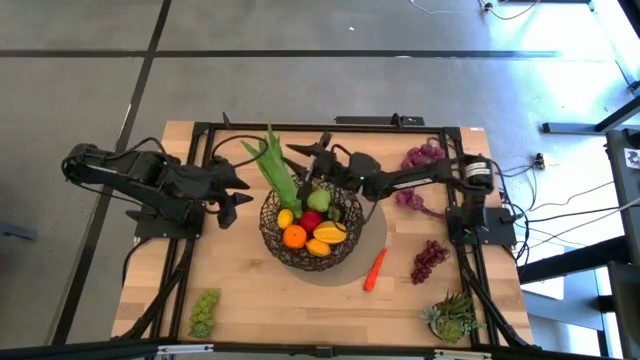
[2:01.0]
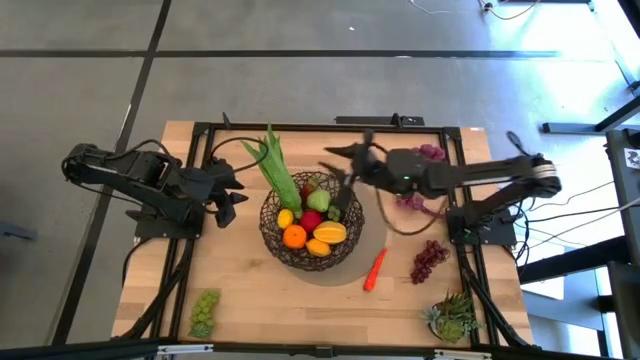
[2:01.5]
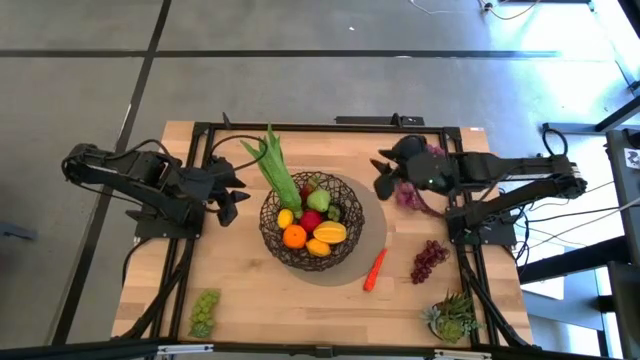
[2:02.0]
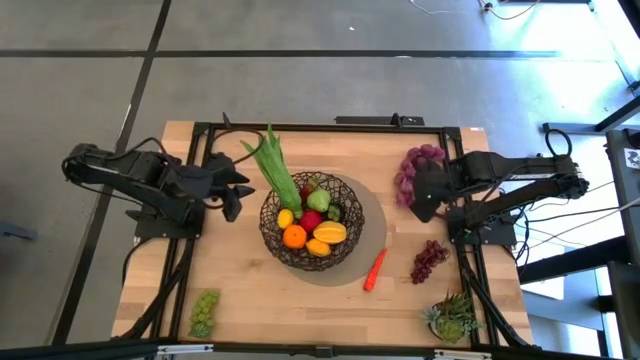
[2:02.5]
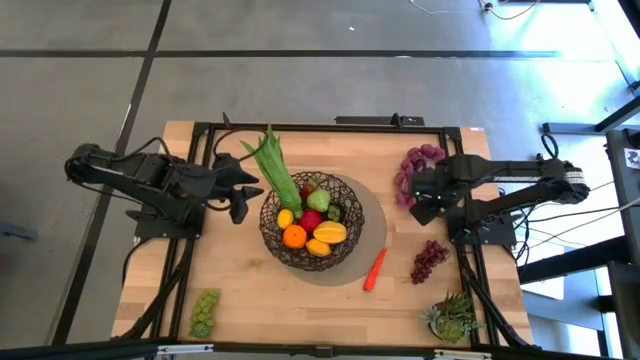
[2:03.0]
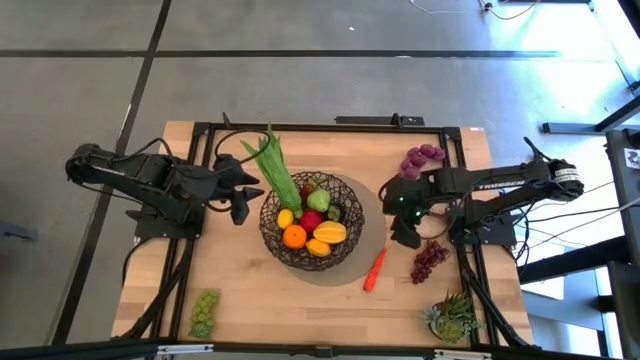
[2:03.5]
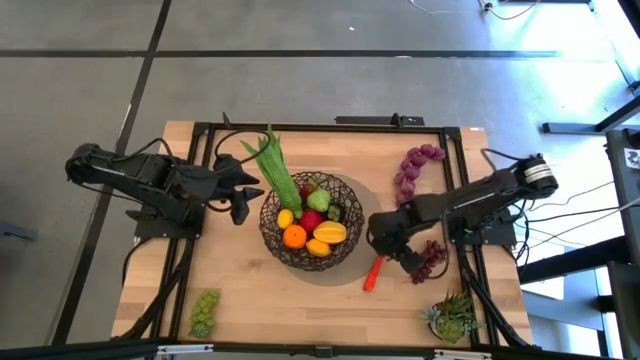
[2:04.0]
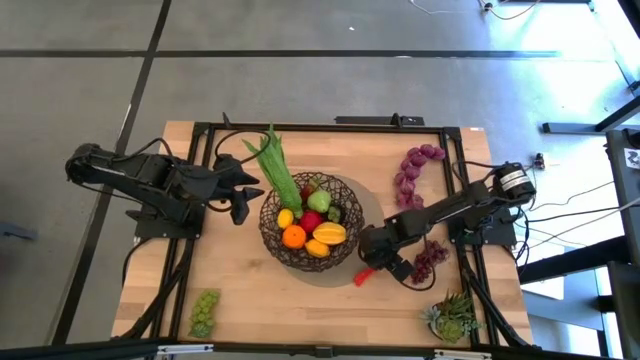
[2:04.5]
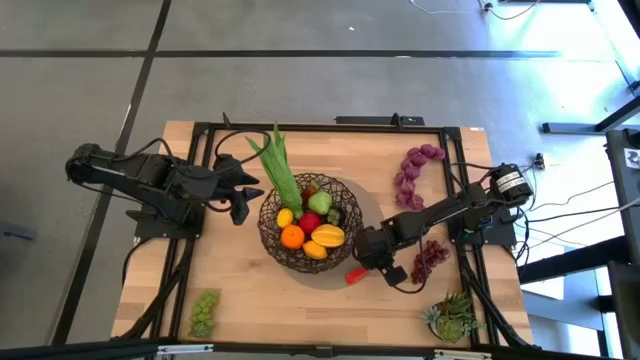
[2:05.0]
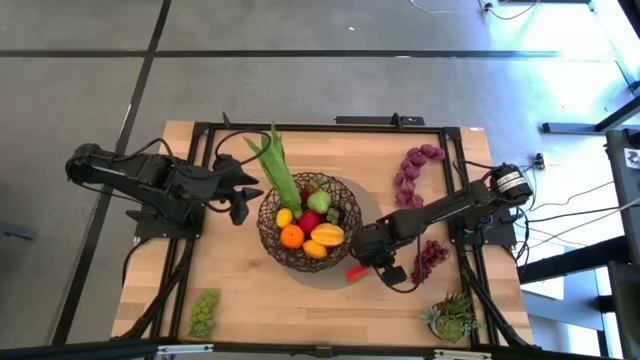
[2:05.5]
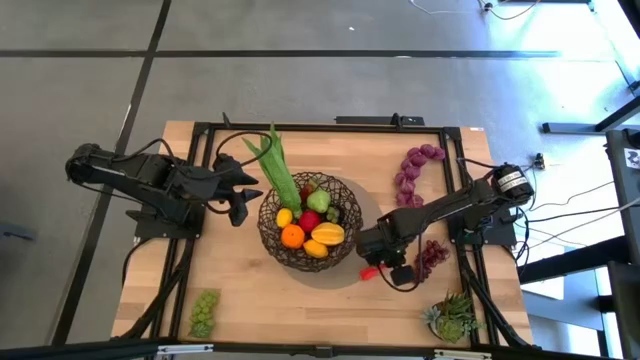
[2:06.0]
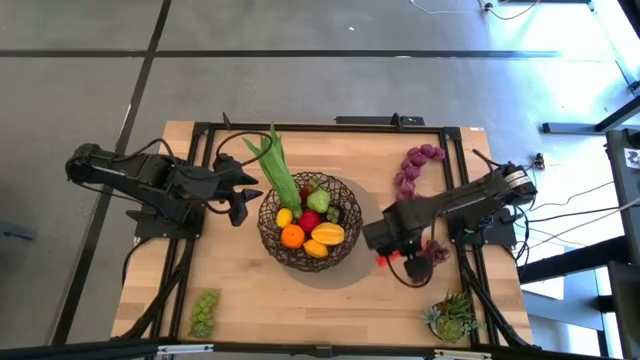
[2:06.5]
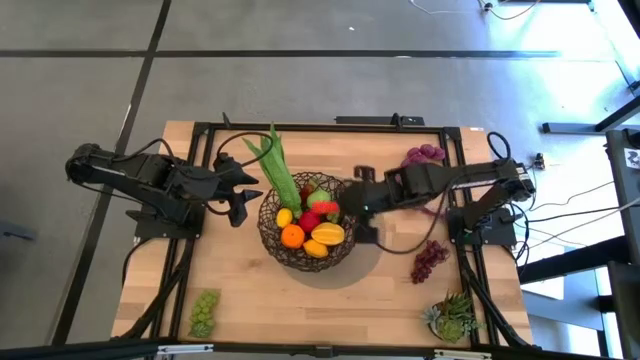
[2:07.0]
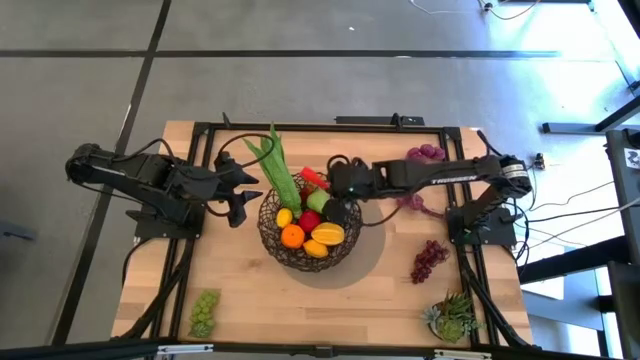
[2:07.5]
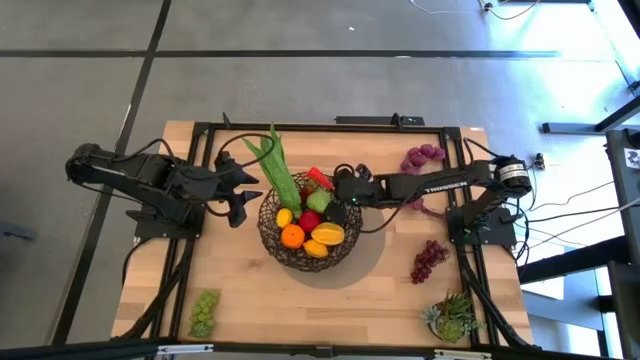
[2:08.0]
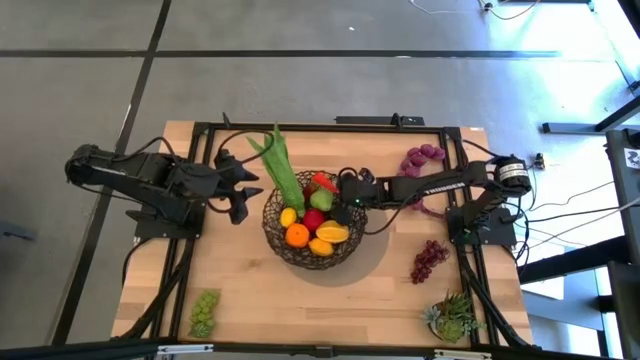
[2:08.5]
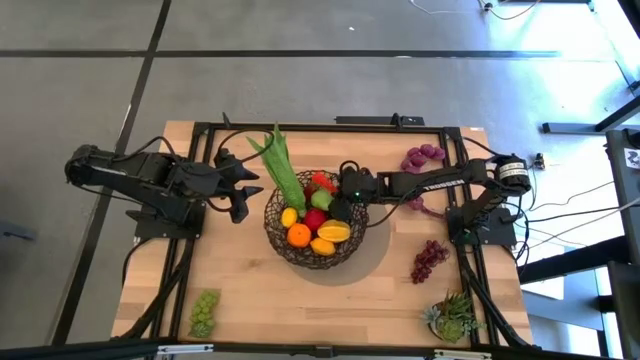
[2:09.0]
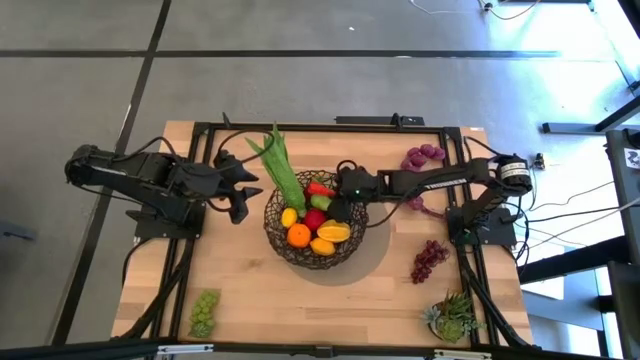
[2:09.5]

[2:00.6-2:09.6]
Task: Build produce basket
Put the carrot into the wire basket

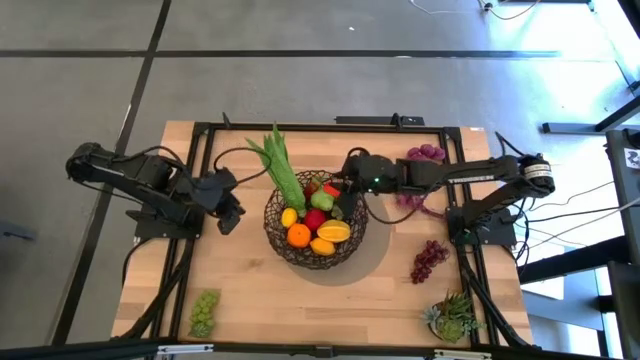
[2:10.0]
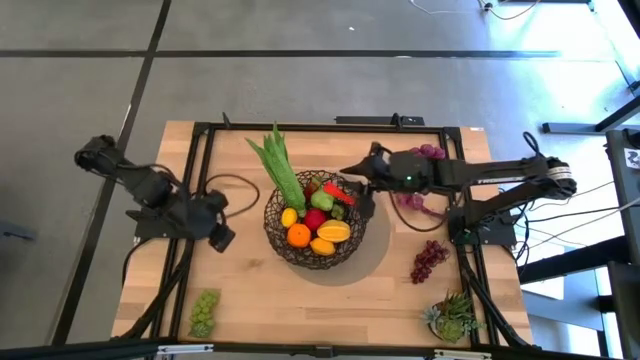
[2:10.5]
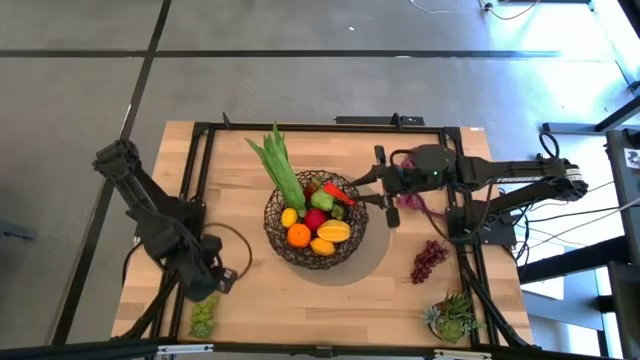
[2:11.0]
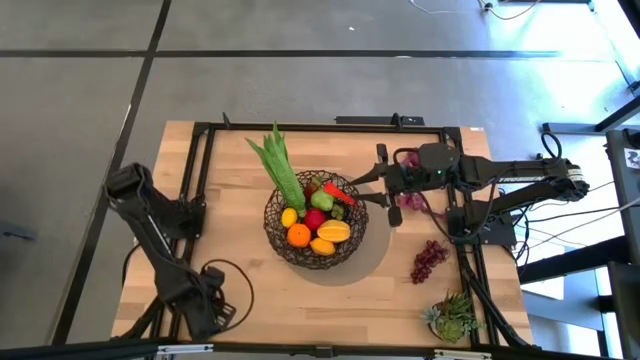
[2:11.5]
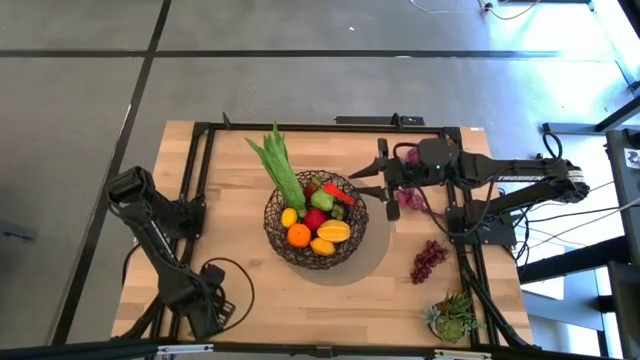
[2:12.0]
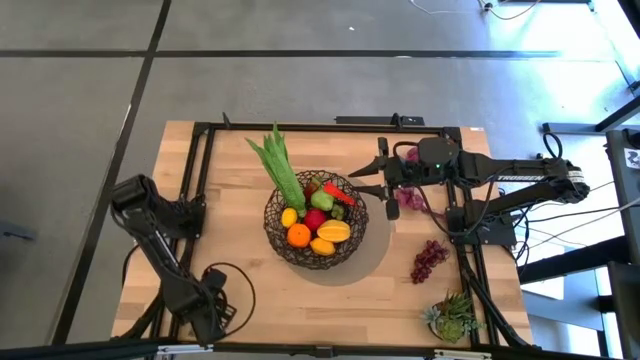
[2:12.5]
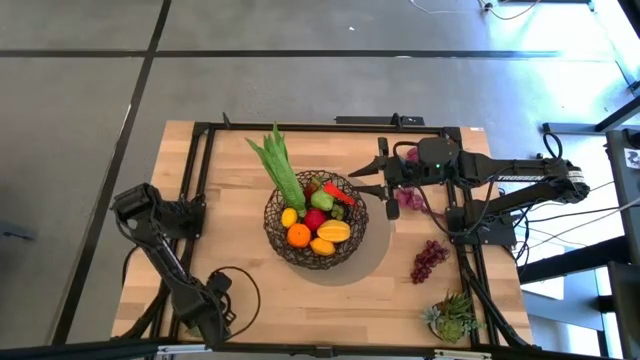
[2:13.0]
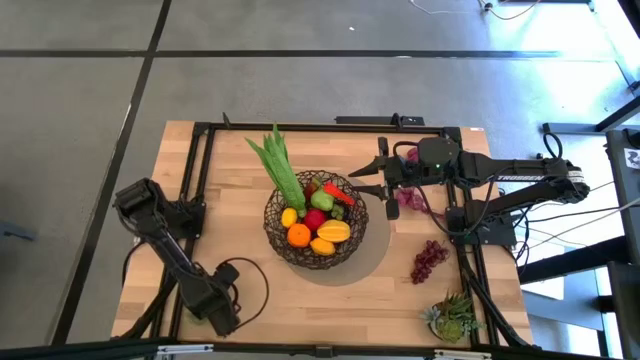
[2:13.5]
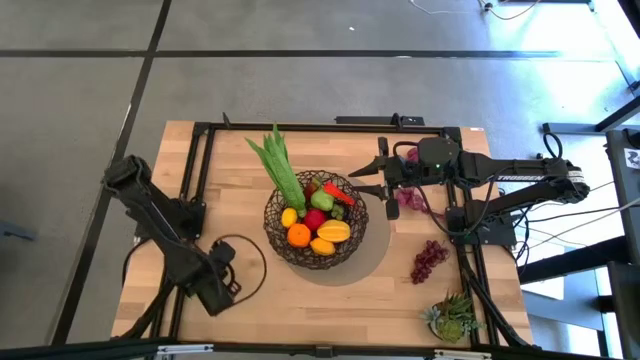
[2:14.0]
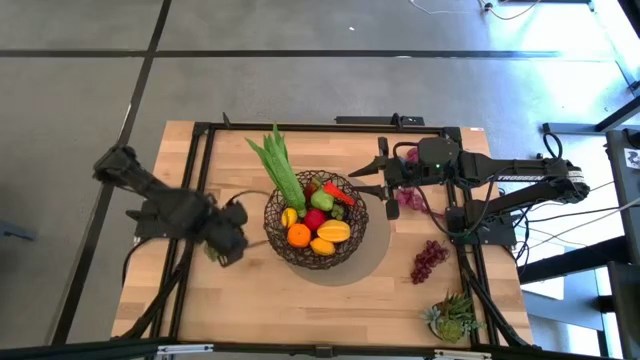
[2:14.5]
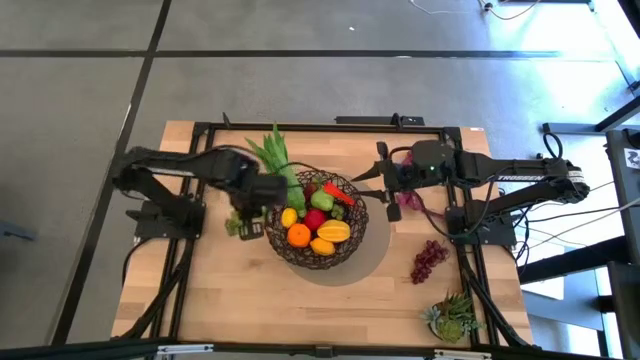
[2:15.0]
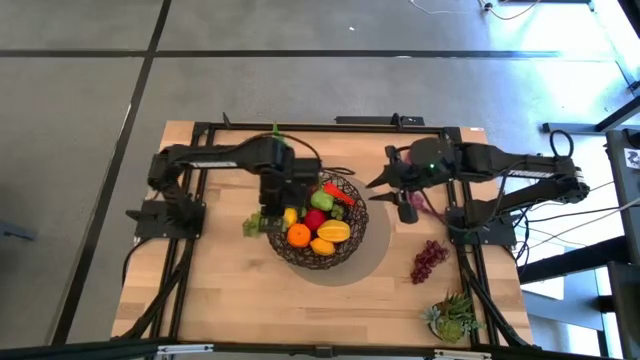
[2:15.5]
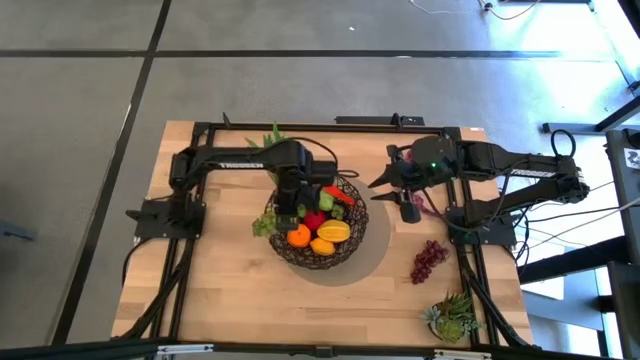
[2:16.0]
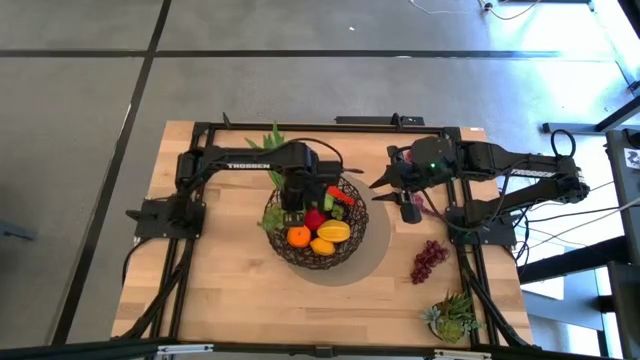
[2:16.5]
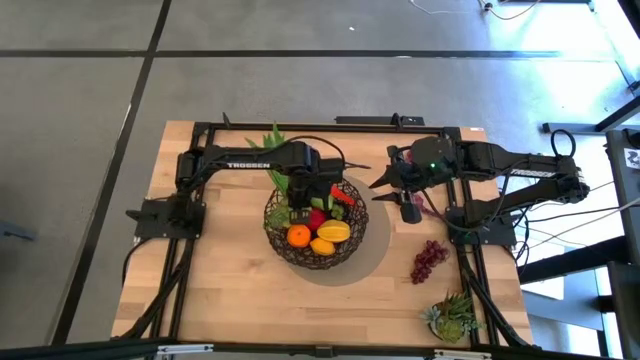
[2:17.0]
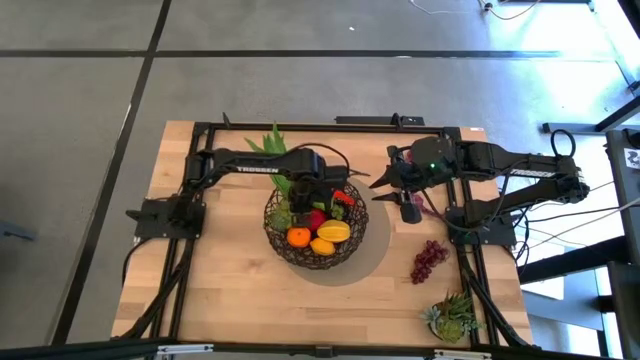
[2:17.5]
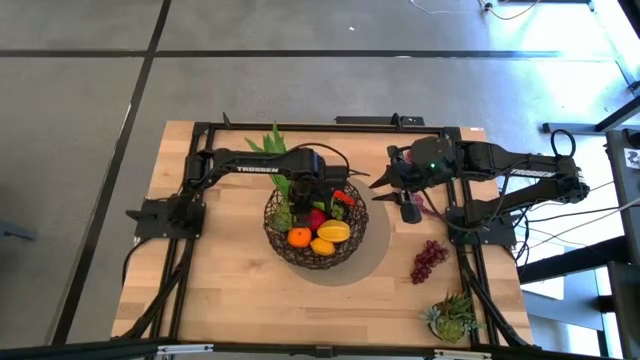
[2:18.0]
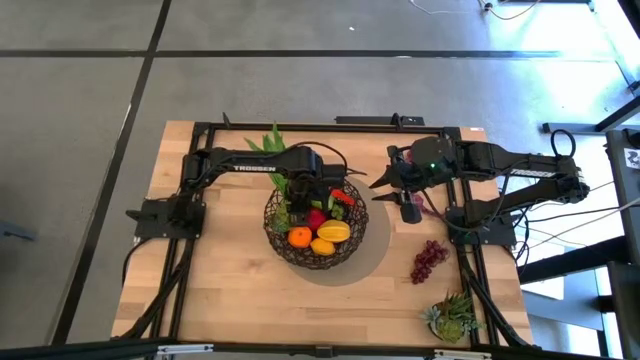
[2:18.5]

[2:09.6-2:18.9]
Put the green grapes into the wire basket

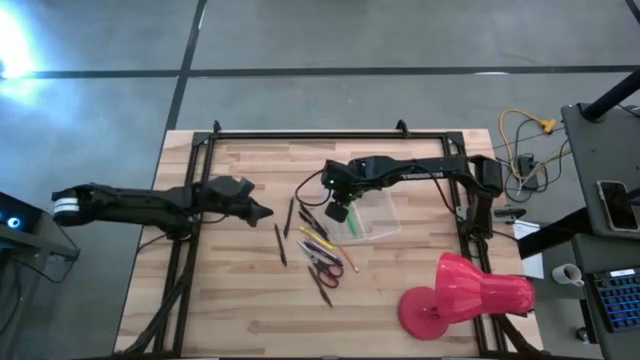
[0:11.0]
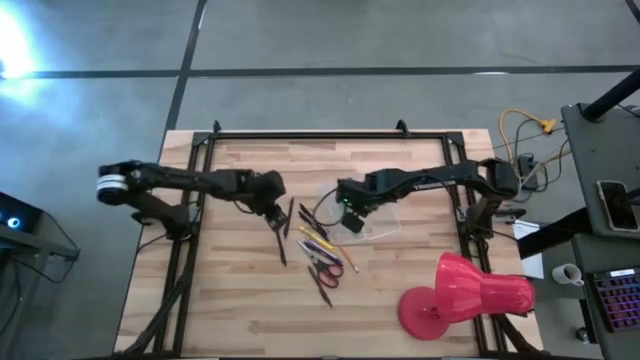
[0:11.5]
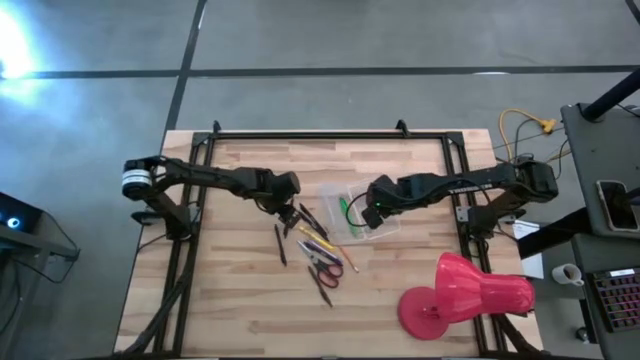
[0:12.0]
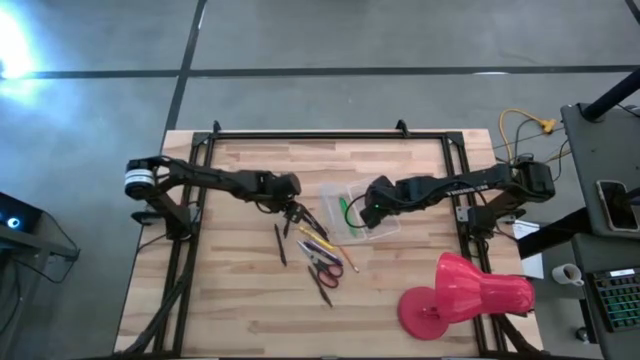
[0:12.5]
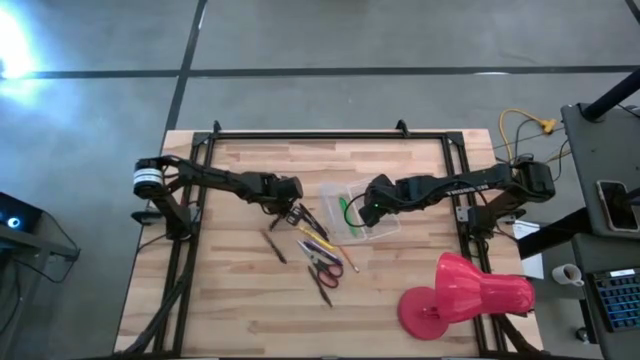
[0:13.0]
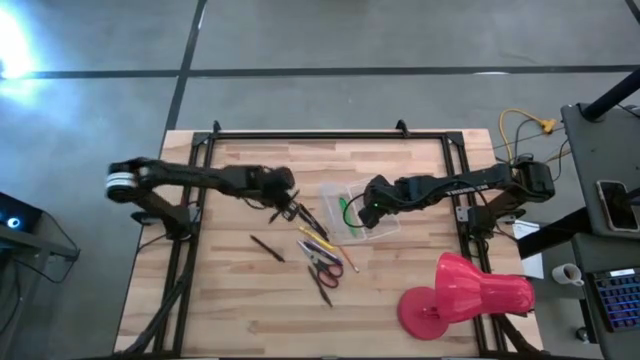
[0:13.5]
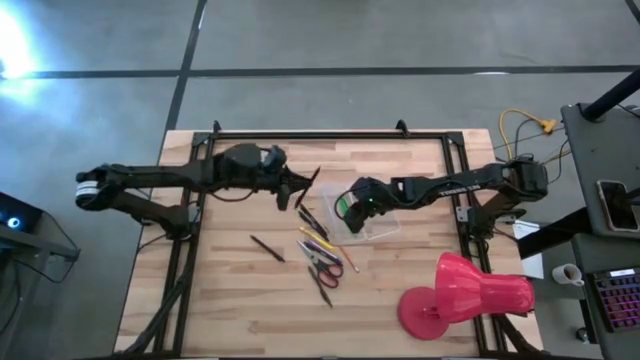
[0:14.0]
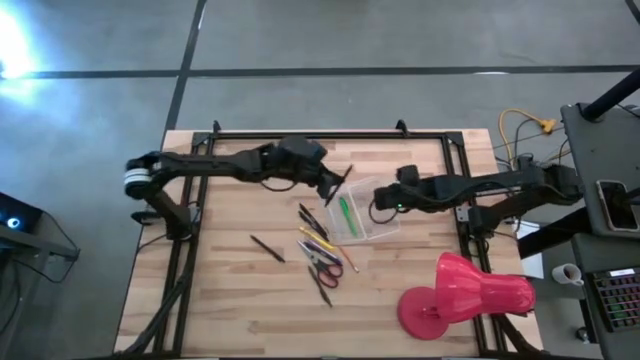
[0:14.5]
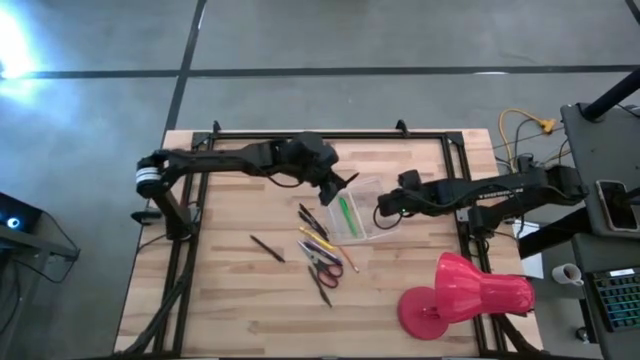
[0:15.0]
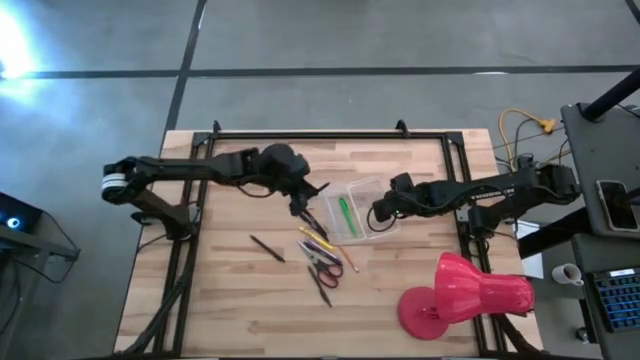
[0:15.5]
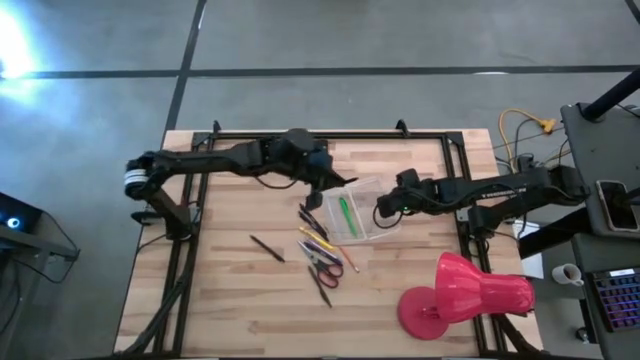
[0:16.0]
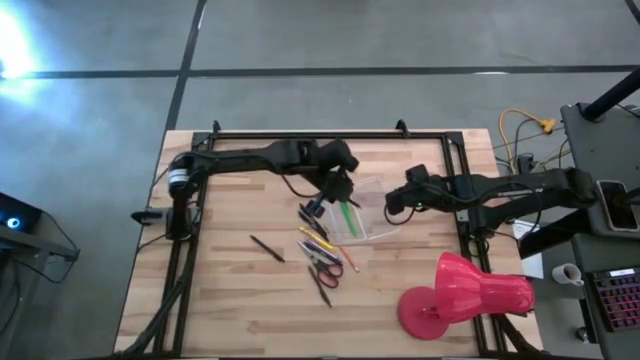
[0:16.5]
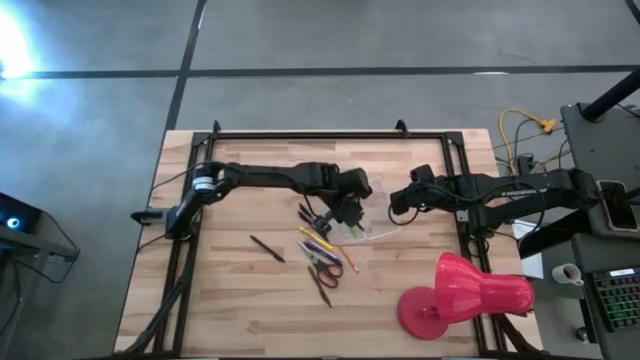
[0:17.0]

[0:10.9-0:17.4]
Task: Pick & place school supplies into a supply box
Put the black pen into the transparent supply box
